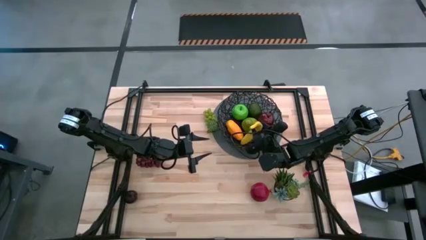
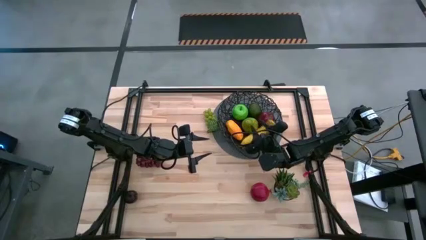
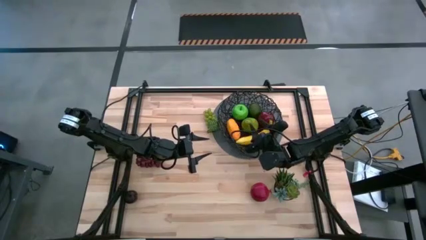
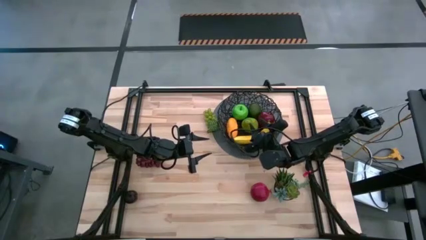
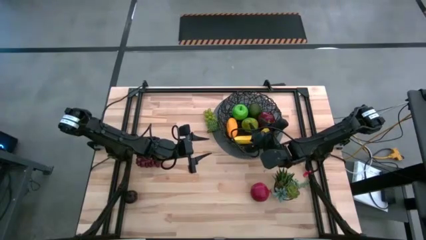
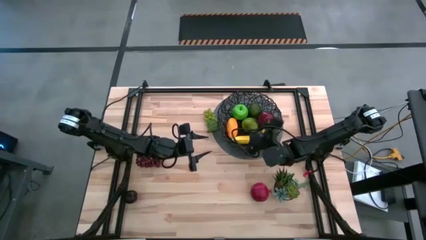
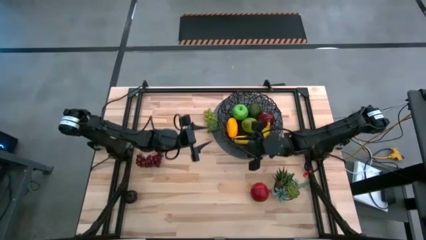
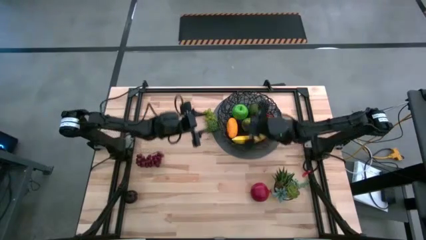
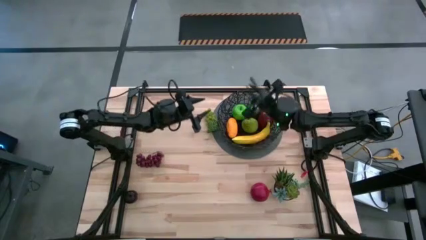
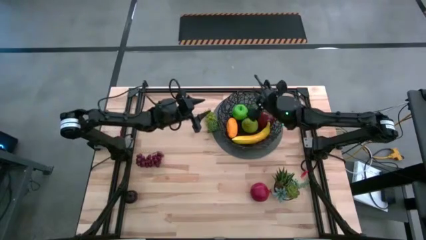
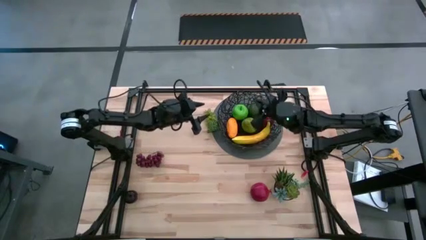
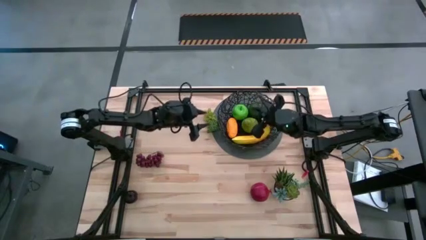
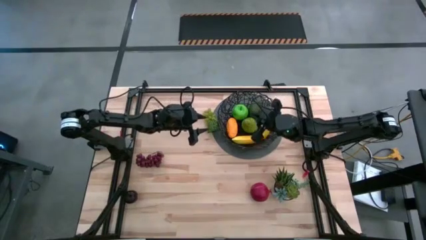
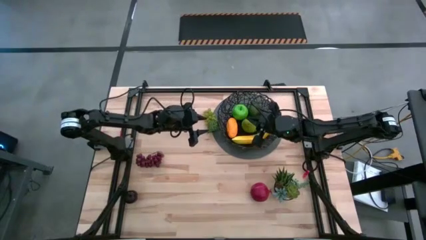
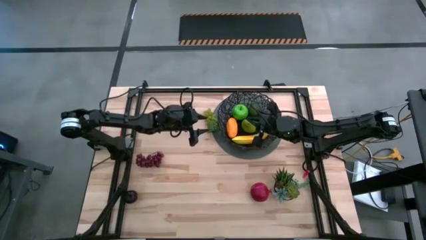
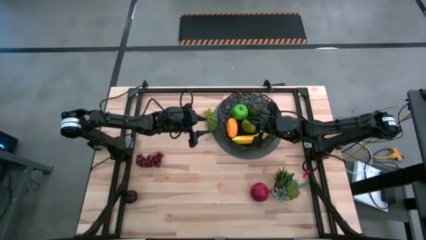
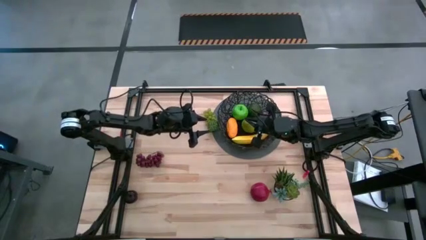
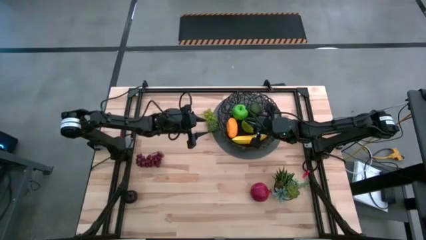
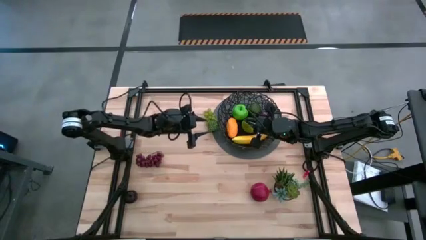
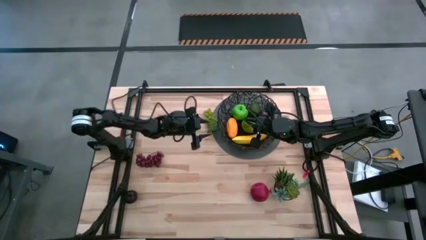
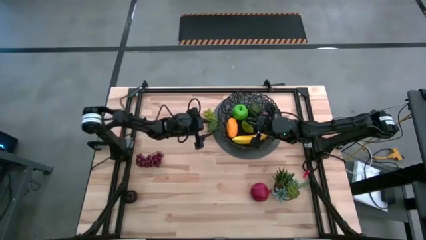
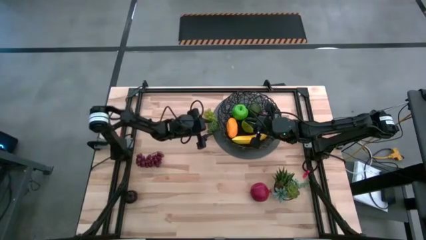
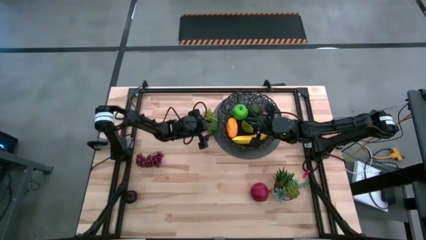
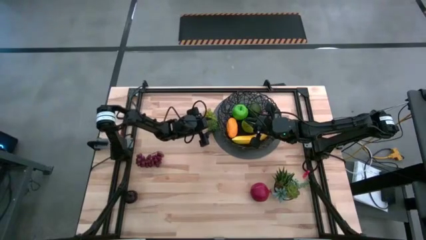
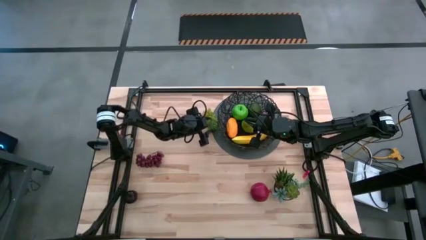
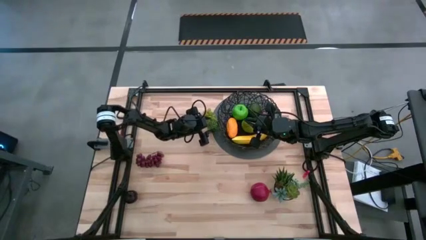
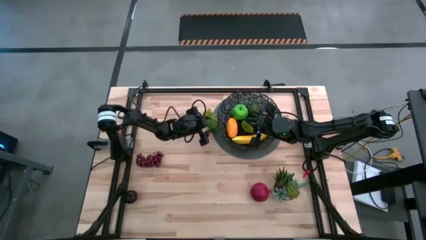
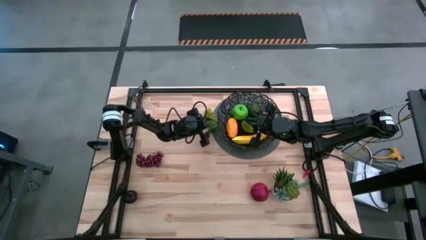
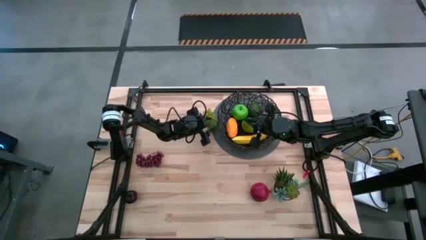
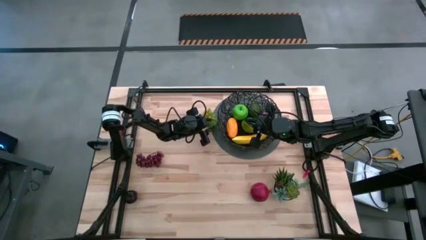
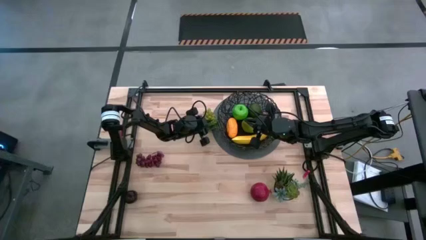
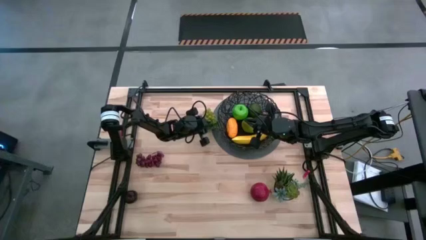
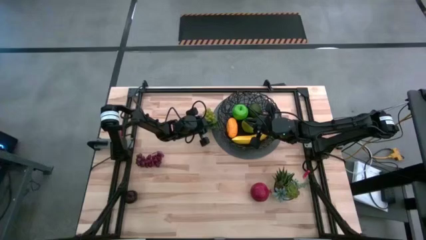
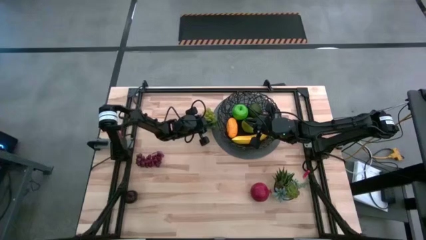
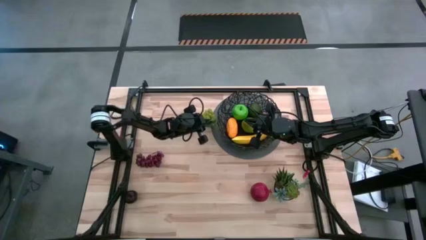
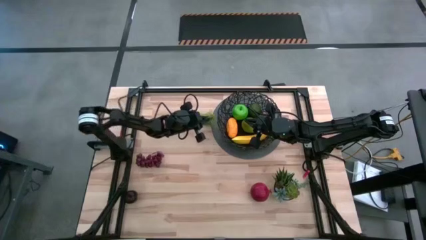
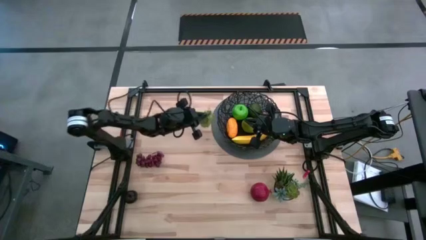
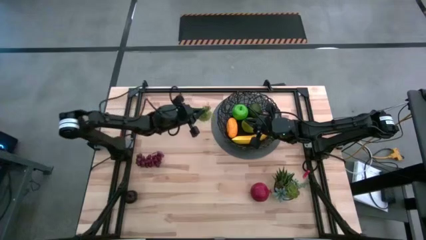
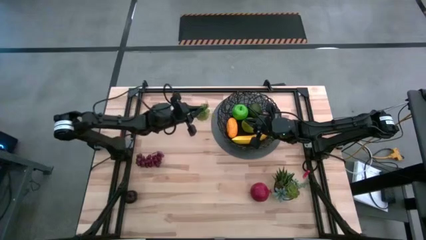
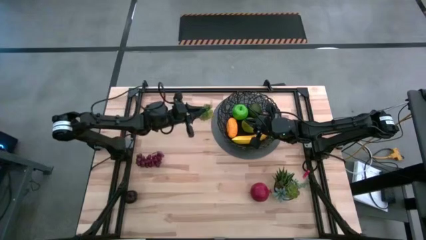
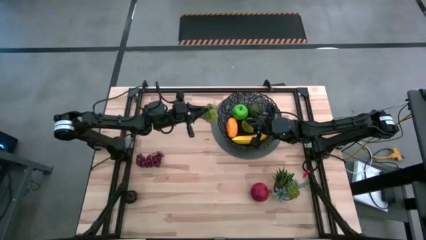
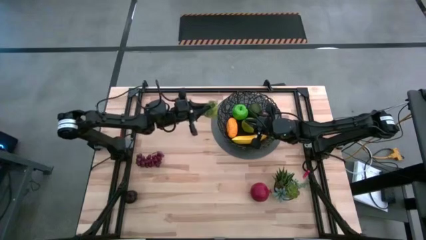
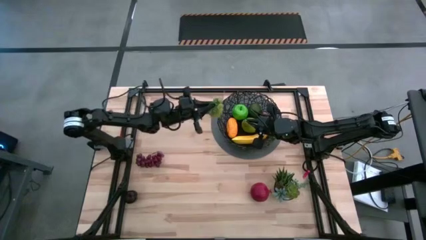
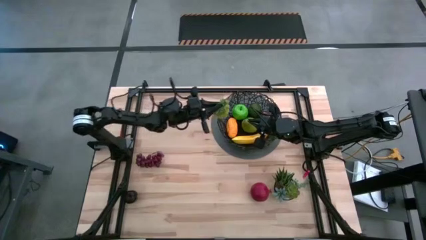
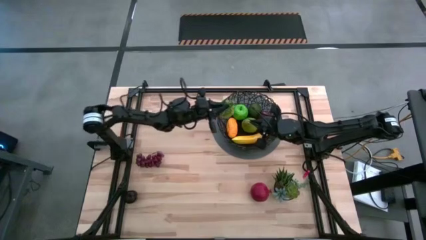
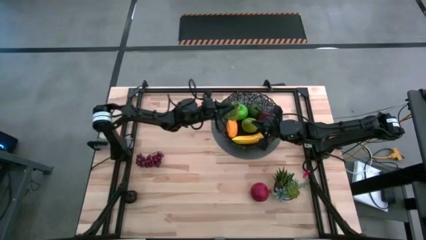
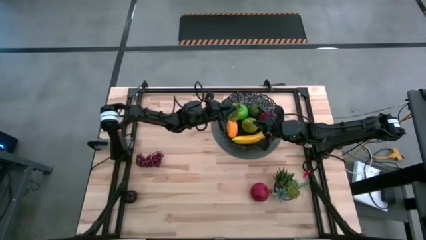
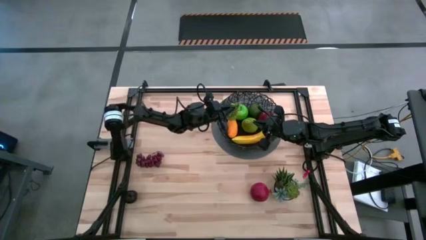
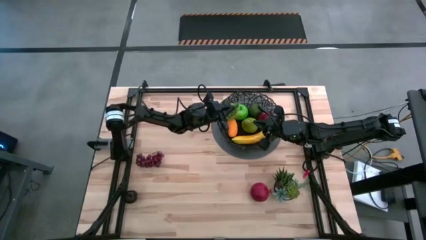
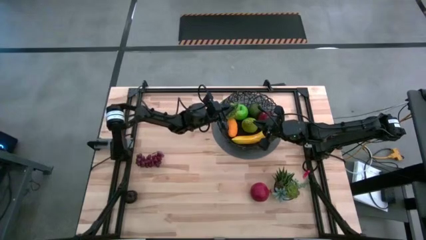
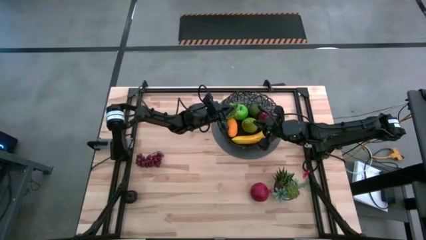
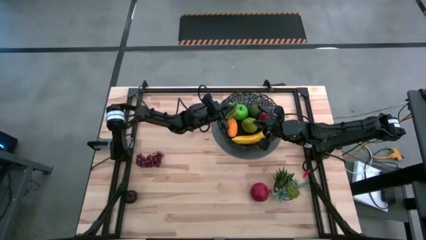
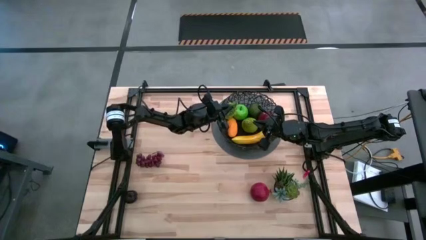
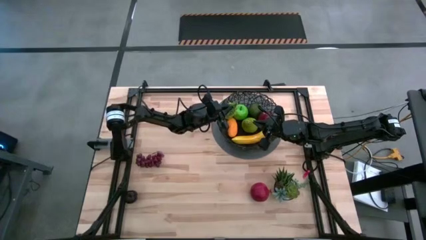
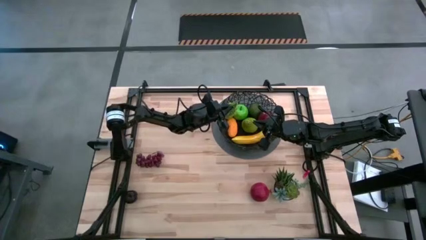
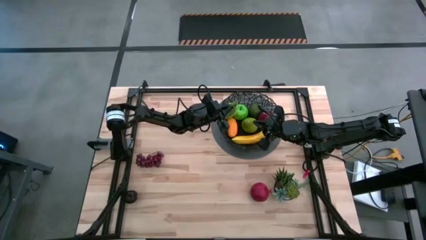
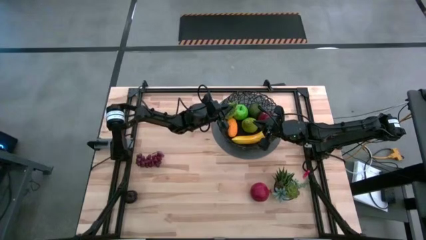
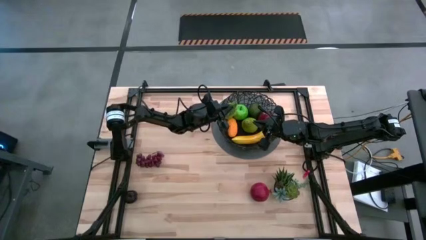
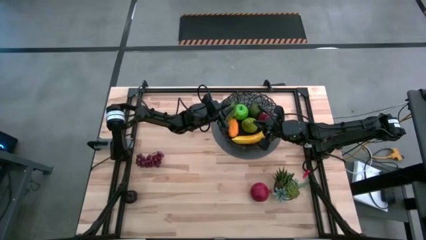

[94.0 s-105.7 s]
Task: Build produce basket
Put the green grapes into the wire basket

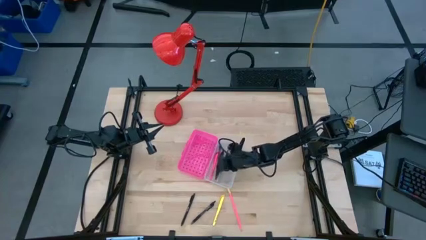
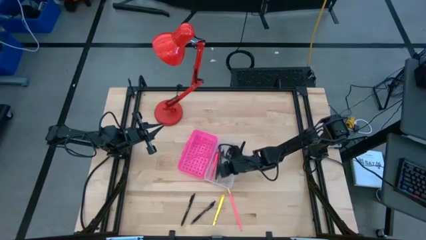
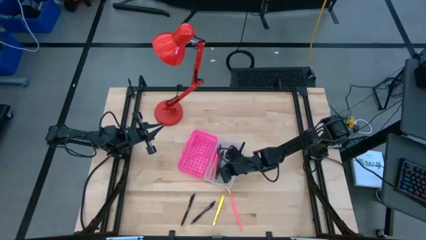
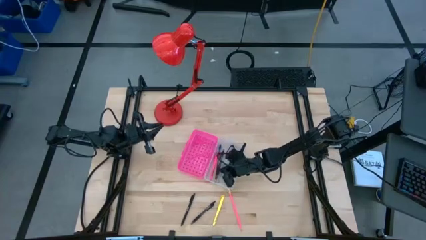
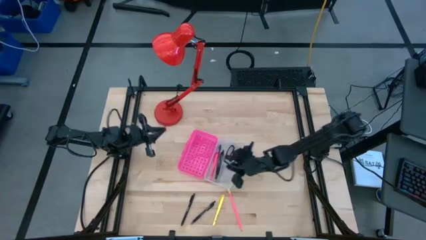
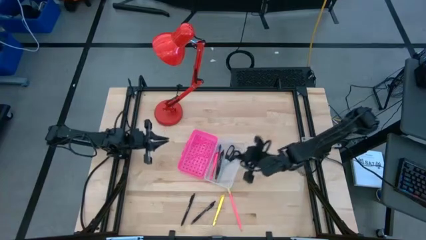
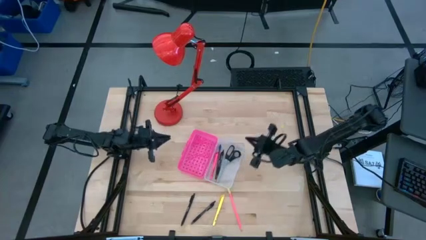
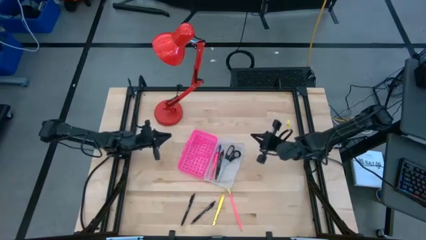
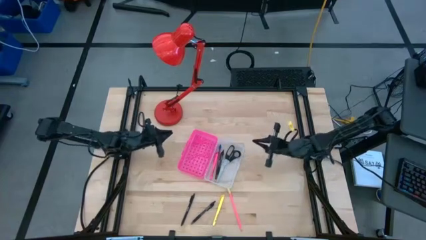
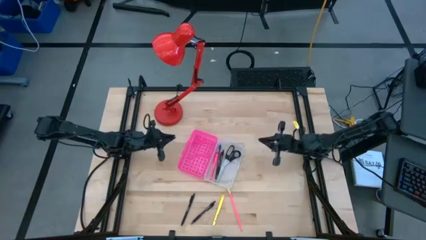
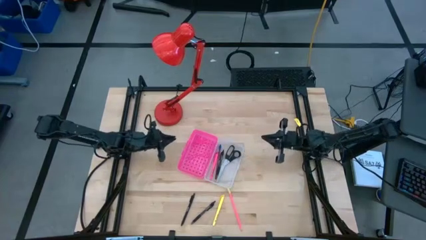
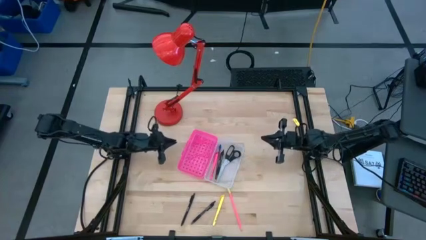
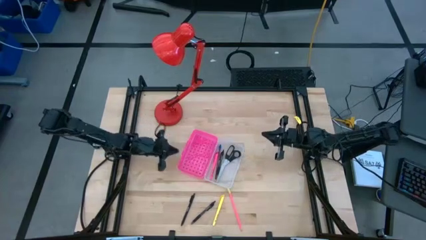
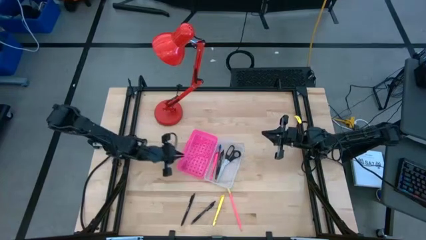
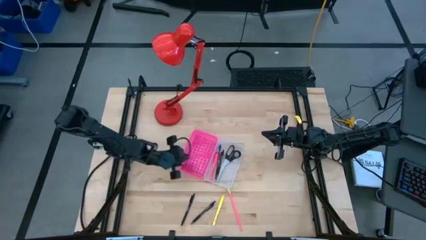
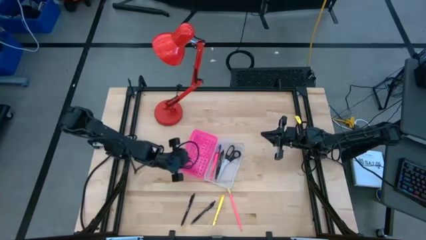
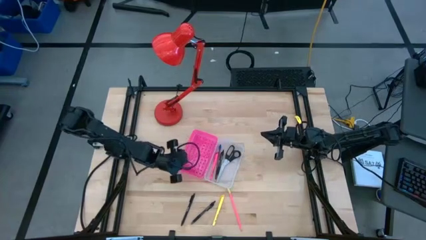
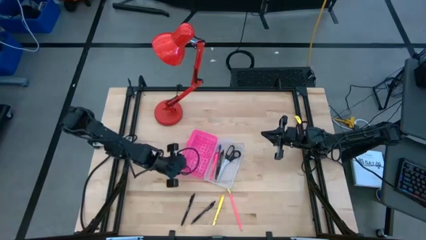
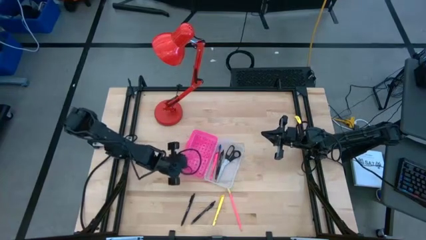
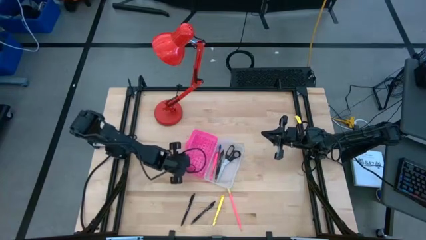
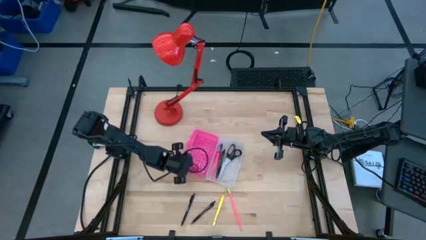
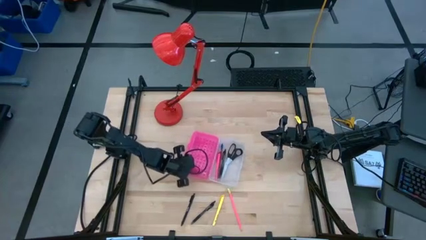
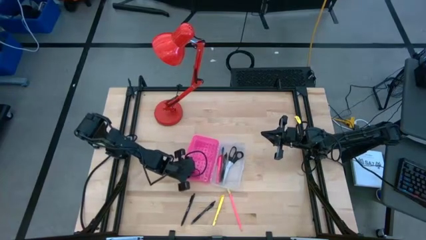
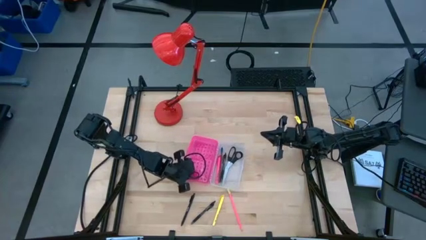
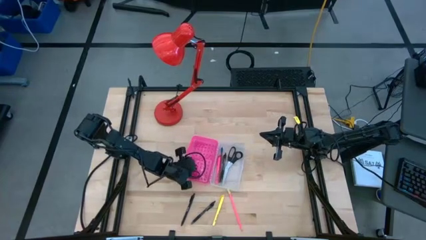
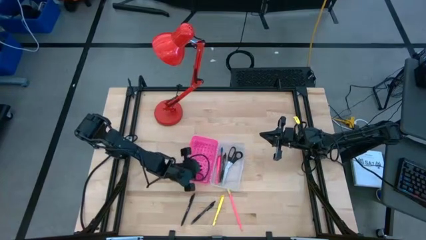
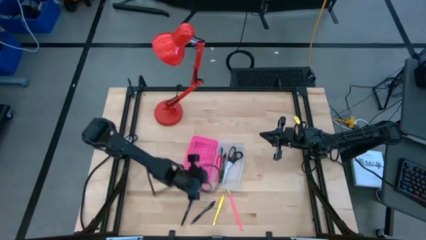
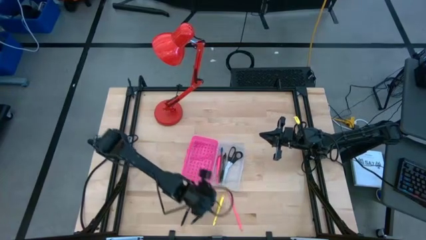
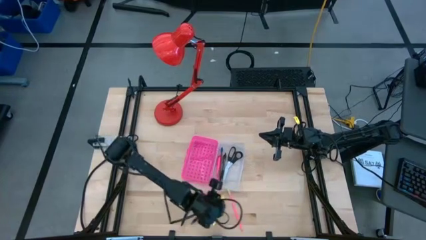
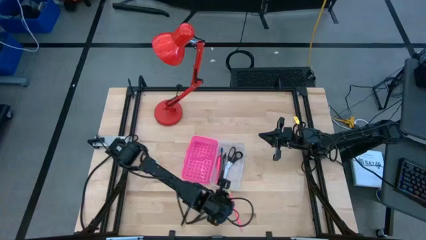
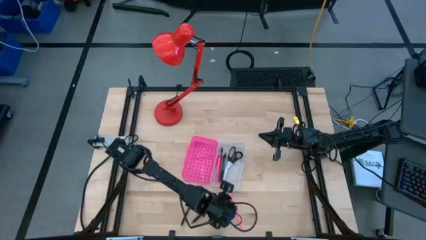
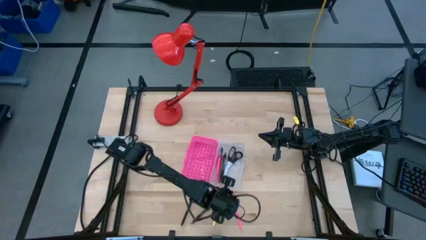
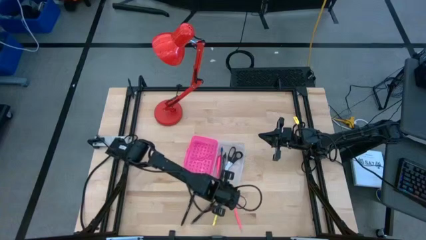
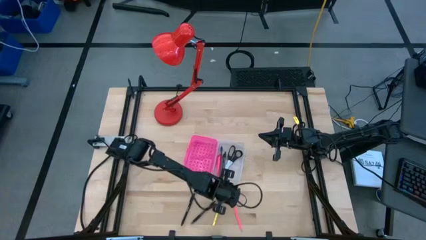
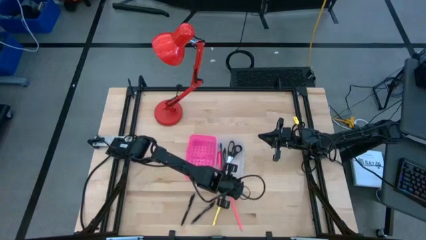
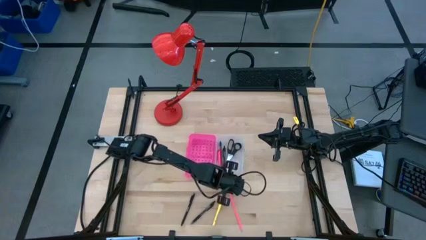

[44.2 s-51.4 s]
Task: Pick & place school supplies into a supply box
Adjust the pink box
